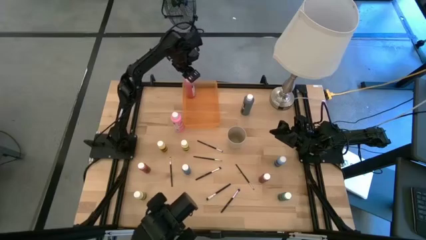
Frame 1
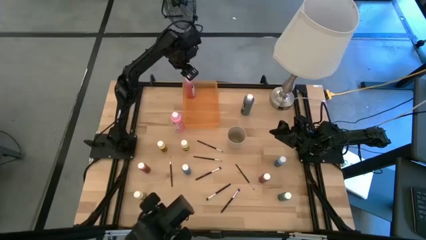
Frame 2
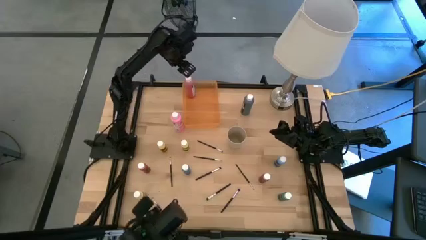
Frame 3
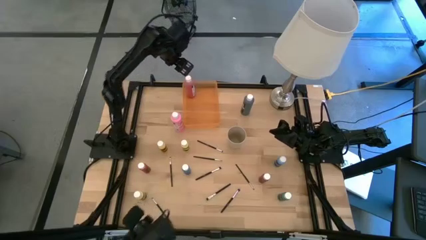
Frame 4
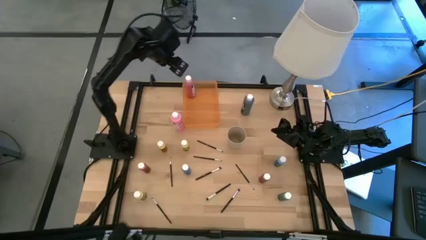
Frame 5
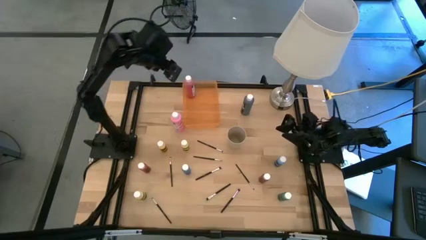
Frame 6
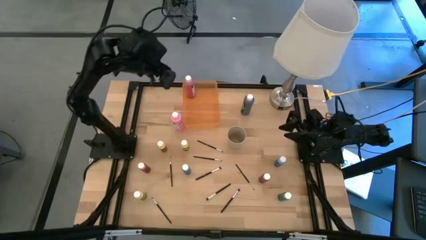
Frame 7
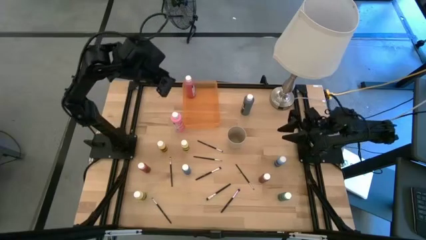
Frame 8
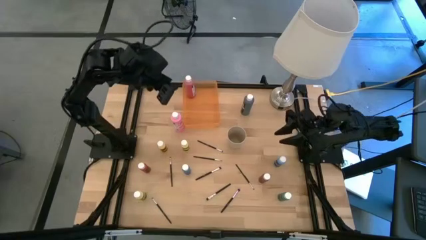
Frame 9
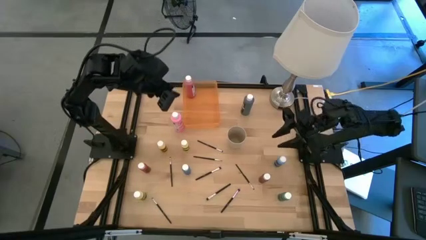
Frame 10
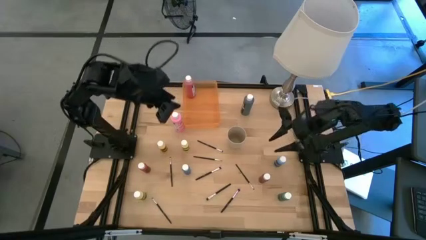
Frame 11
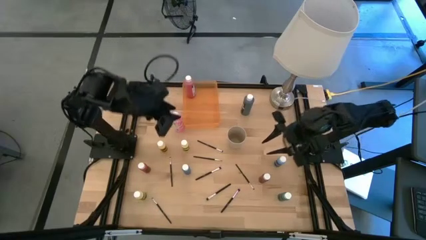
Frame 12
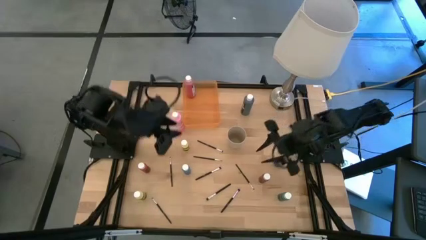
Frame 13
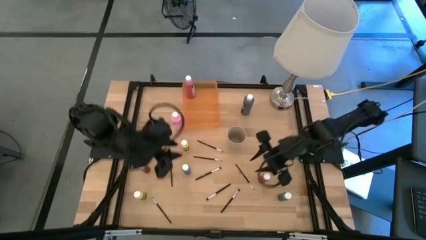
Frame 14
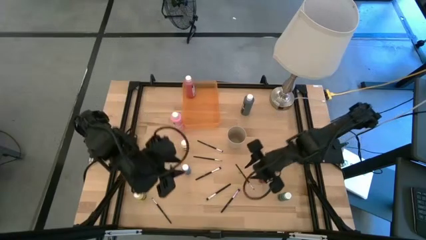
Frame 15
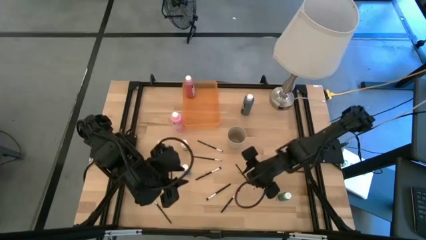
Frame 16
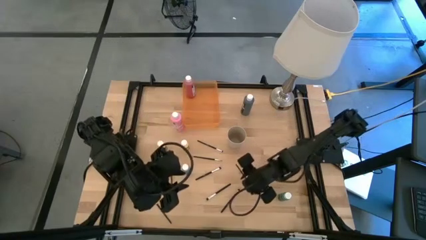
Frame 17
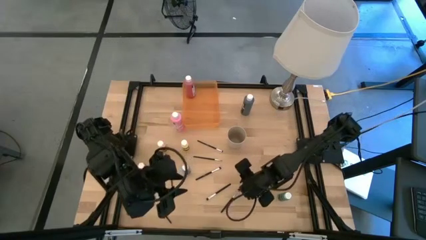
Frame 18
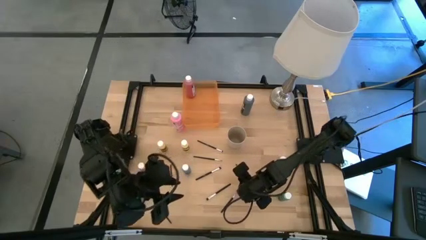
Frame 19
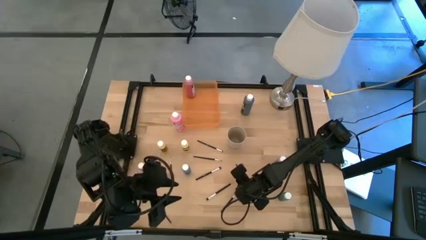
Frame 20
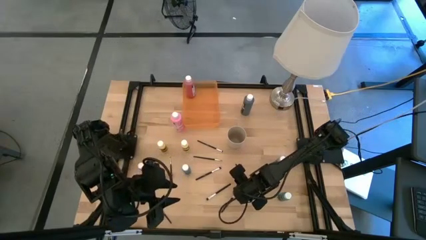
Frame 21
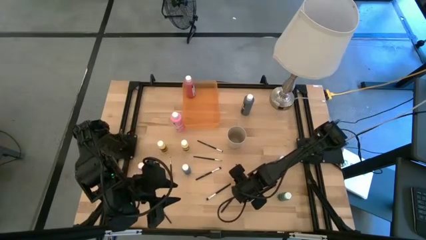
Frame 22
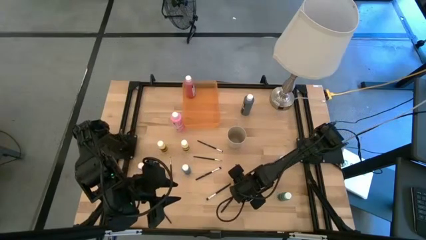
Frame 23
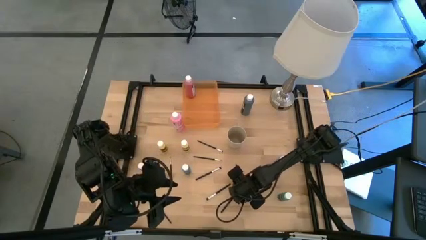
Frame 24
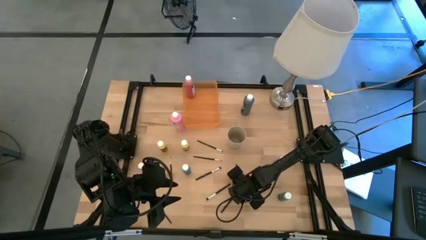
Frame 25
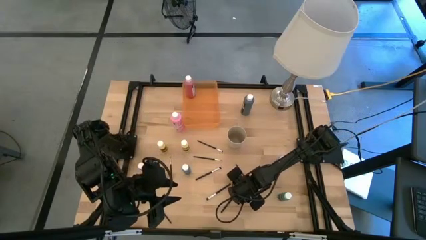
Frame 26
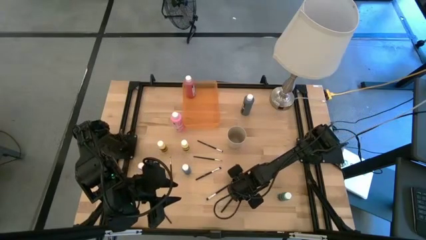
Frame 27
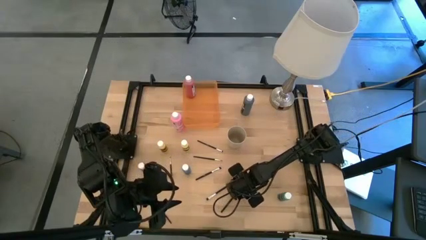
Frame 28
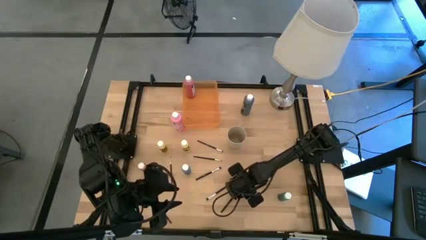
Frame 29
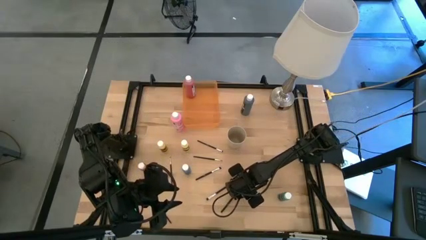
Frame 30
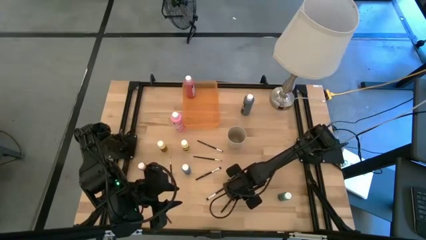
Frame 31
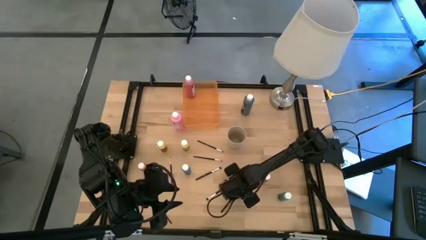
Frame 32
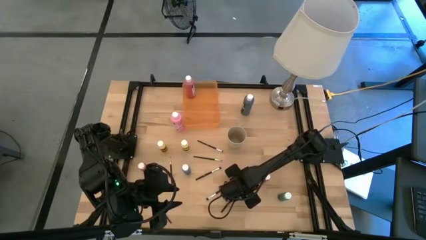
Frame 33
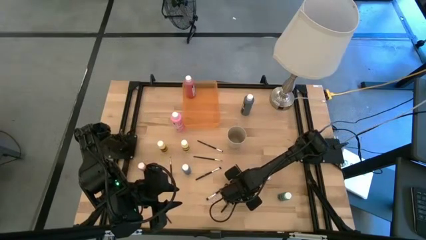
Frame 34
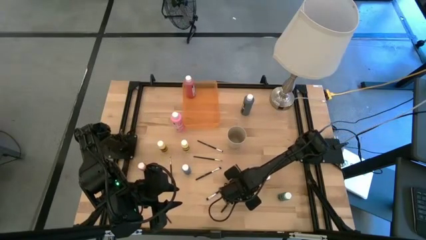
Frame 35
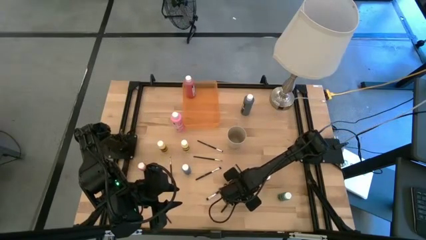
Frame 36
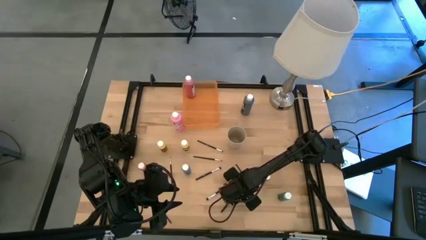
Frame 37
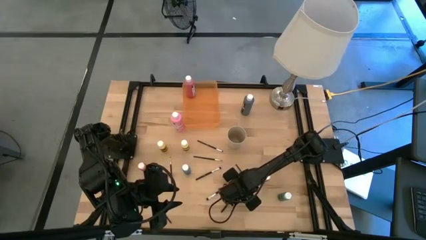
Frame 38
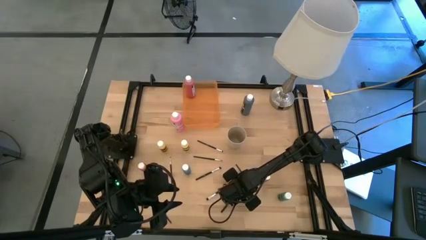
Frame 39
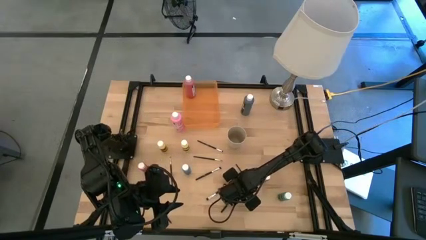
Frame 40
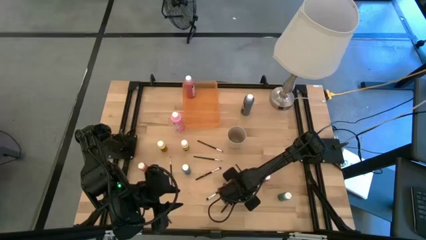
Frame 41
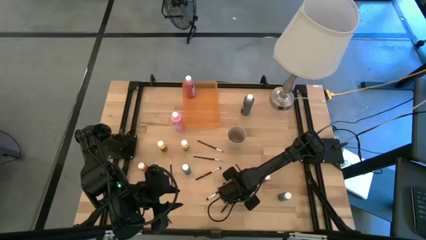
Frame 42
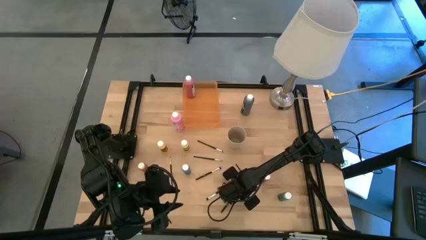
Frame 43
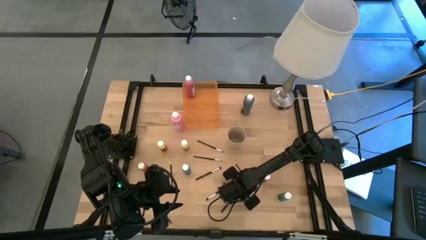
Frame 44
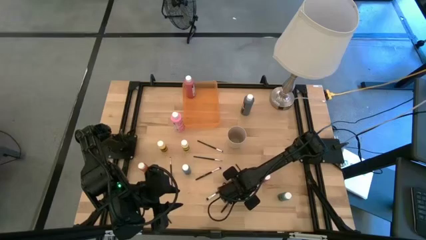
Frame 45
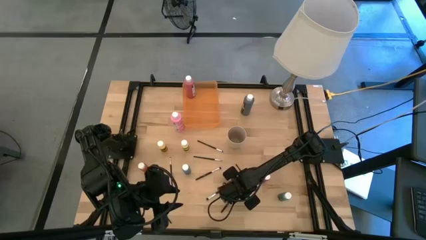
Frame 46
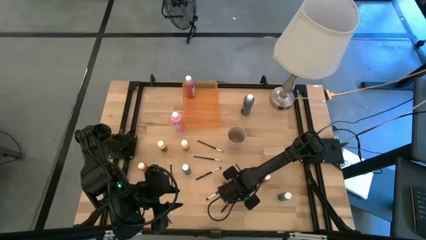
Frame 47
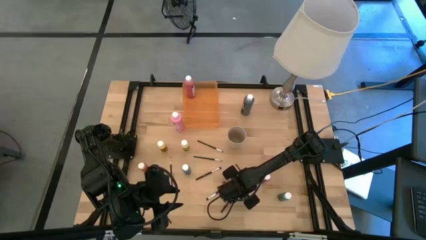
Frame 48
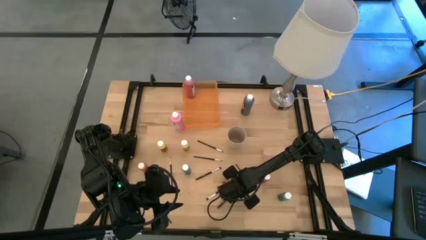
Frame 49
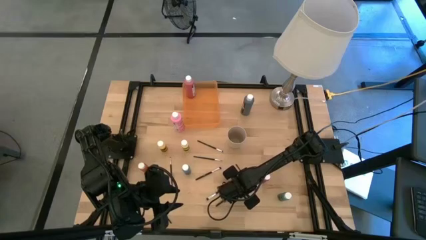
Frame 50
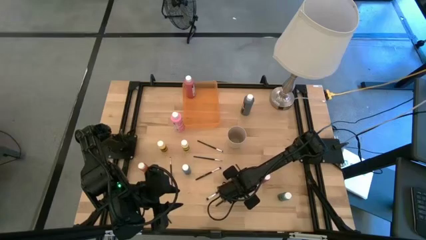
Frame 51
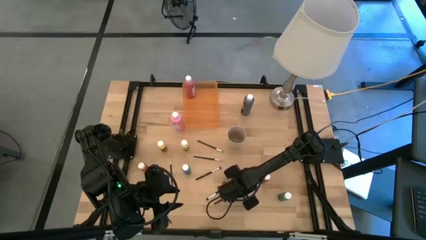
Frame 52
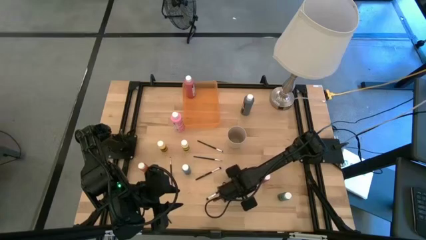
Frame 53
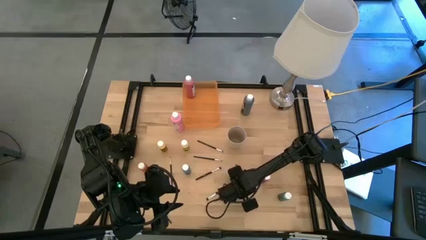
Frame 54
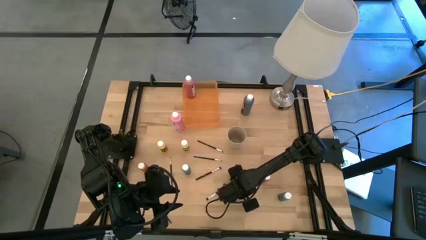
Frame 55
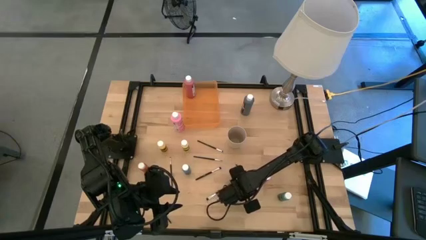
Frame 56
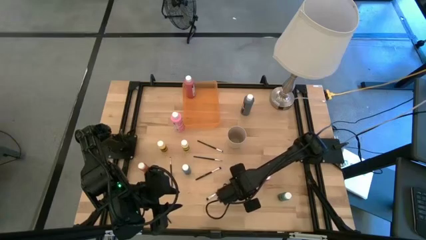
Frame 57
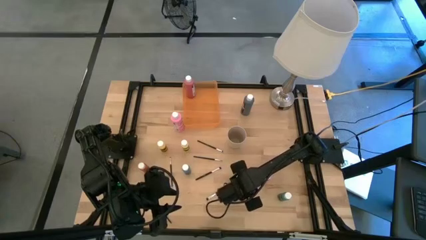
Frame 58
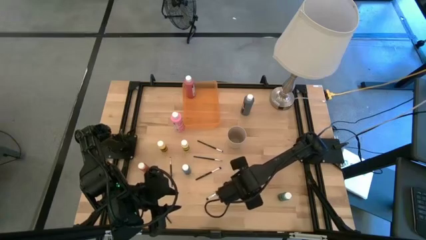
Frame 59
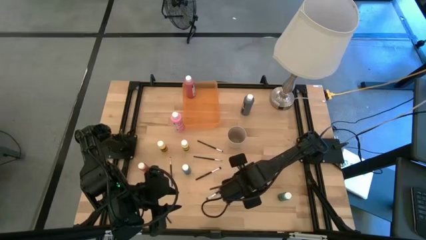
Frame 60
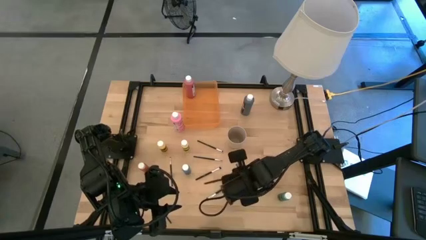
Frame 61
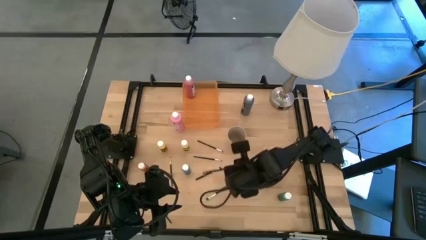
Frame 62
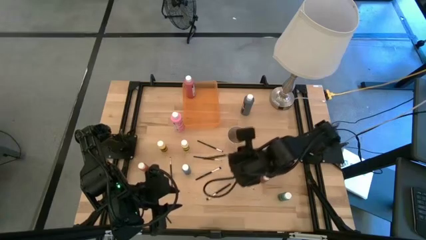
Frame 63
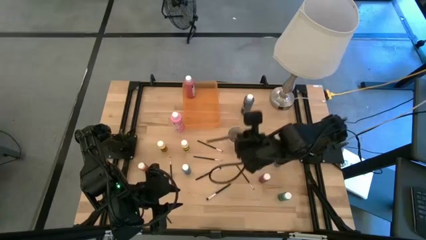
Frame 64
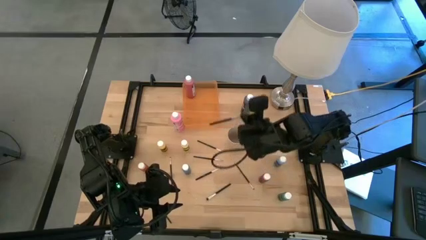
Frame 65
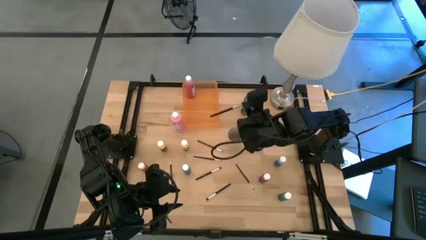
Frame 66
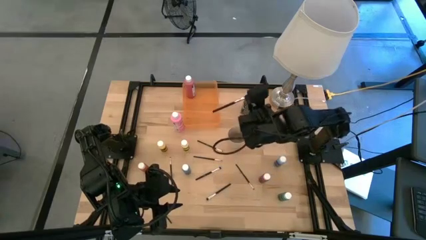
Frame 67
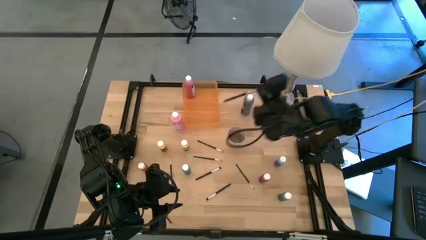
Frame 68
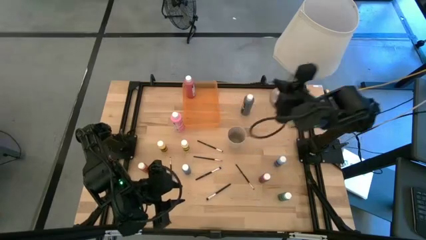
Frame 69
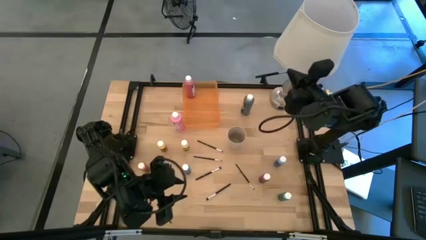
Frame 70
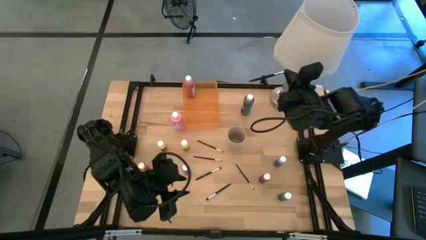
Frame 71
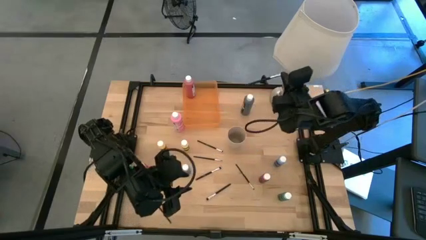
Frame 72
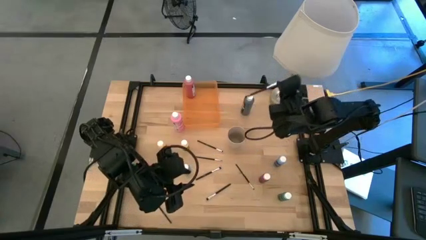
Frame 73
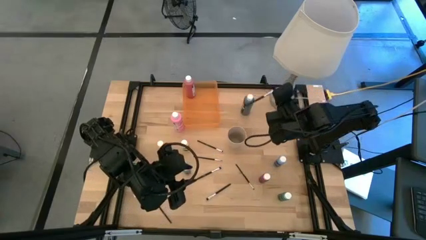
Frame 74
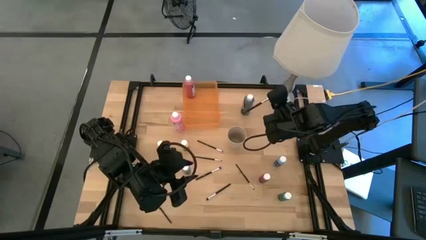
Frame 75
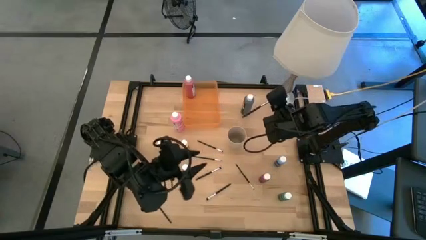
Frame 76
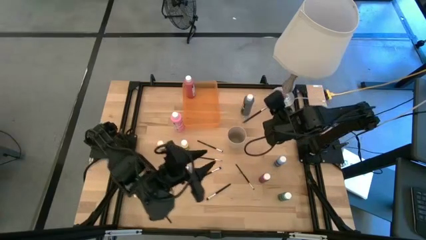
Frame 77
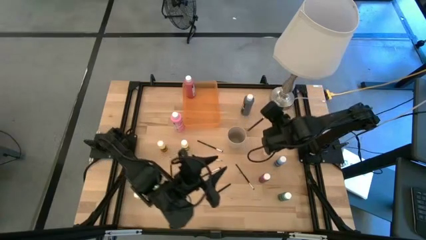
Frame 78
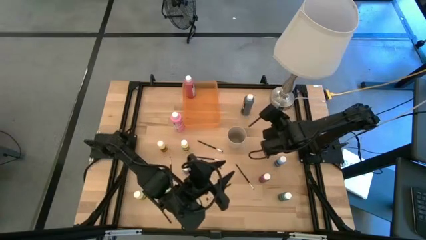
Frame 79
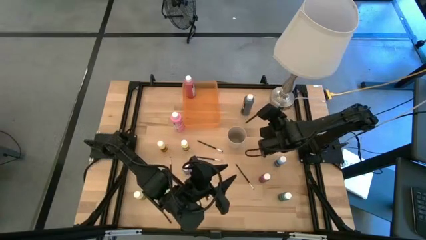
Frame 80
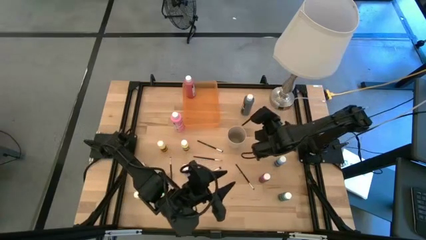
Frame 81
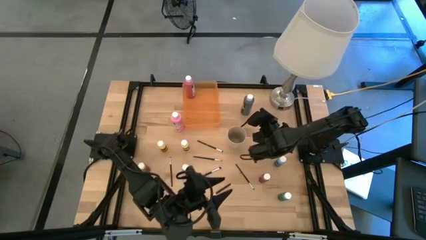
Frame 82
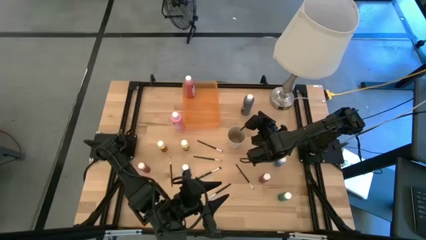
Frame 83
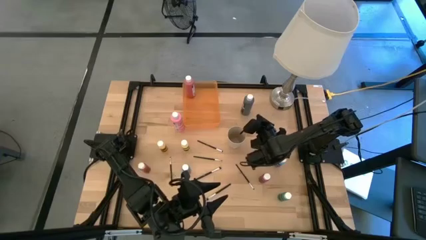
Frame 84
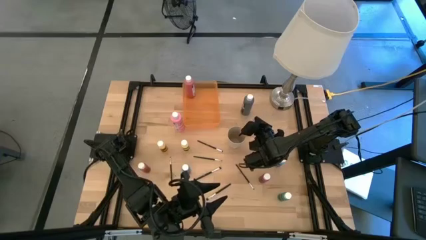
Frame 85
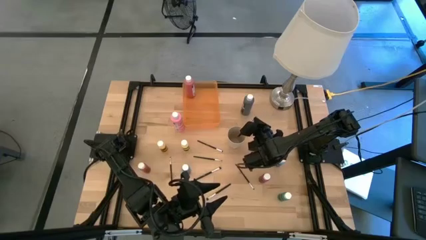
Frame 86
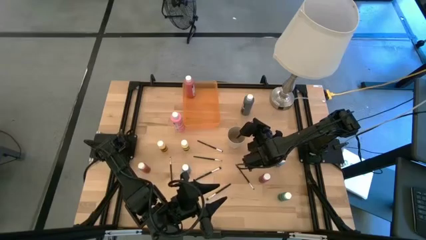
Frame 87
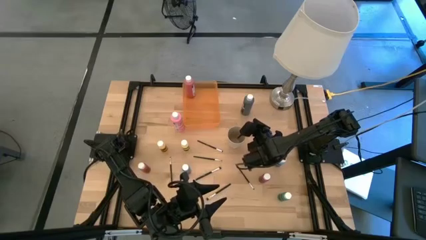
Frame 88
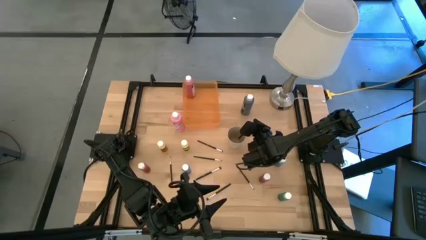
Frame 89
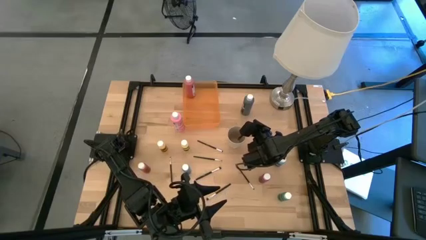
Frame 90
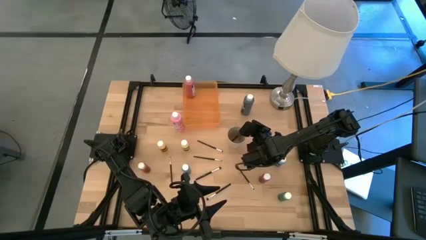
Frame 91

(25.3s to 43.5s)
Task: Pick & Place Paint Supplies
Put the black paint brush into the light brown cup
